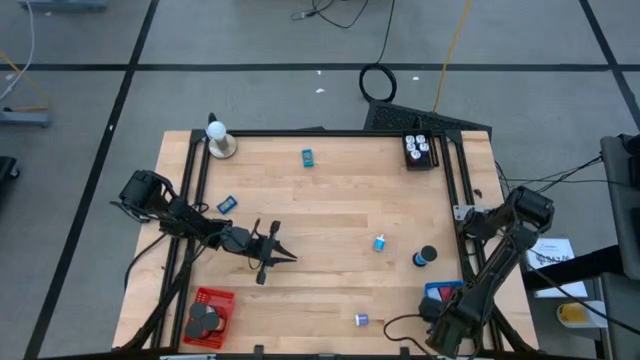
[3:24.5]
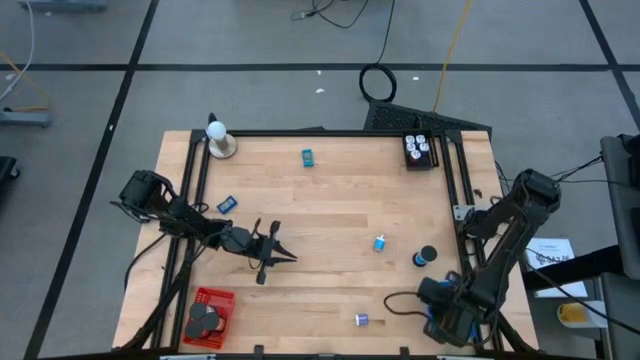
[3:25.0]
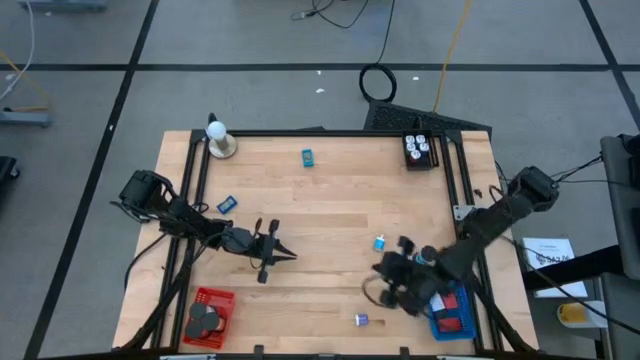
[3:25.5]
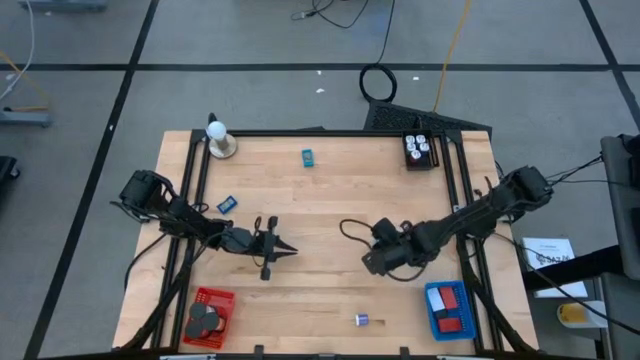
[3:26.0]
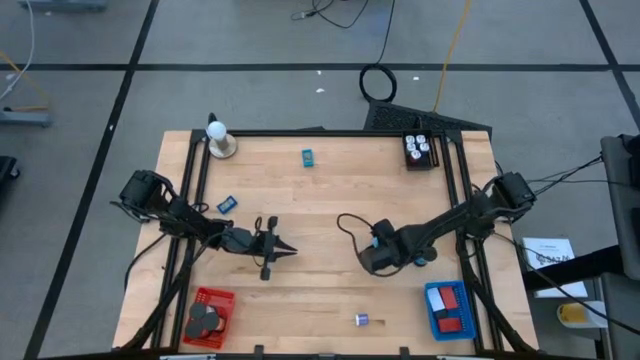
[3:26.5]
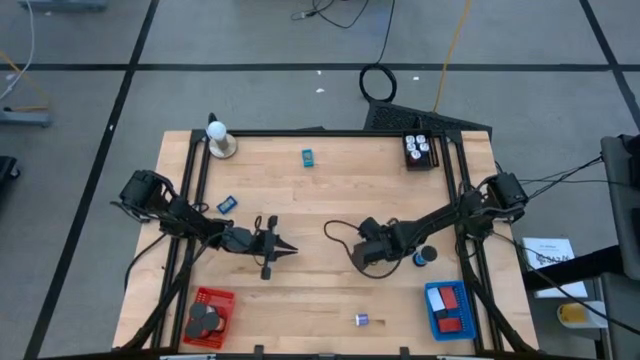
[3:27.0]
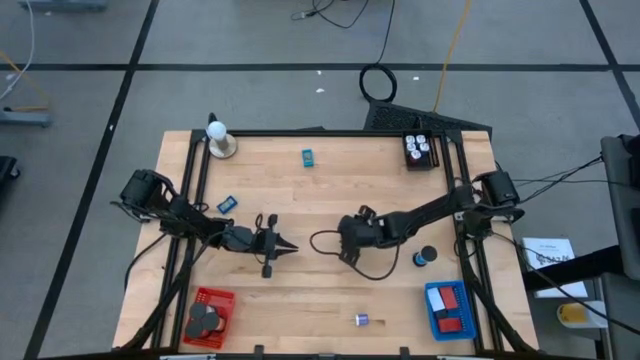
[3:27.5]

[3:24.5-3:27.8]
Task: Pick & Place Office items
Put the blue charger adapter into the black bin

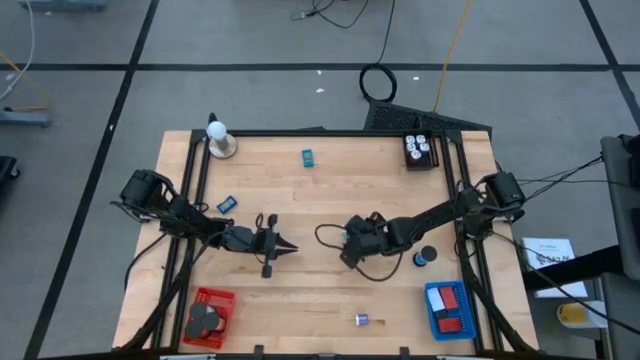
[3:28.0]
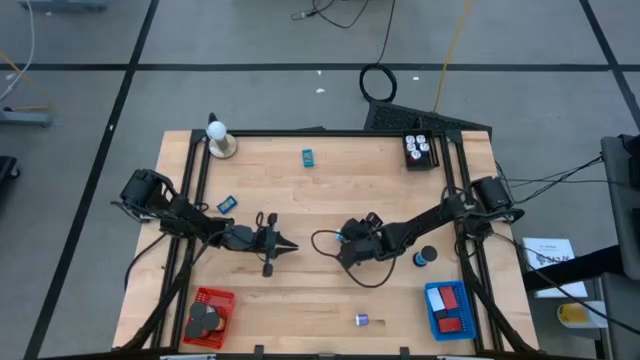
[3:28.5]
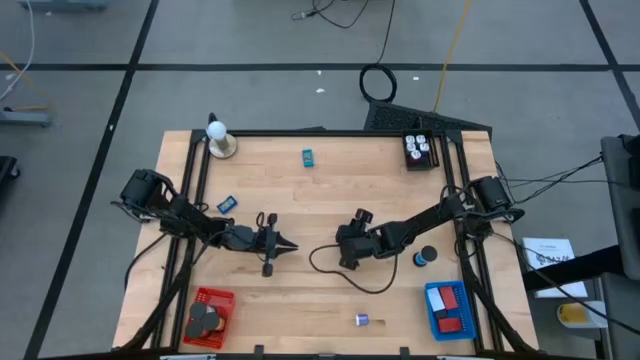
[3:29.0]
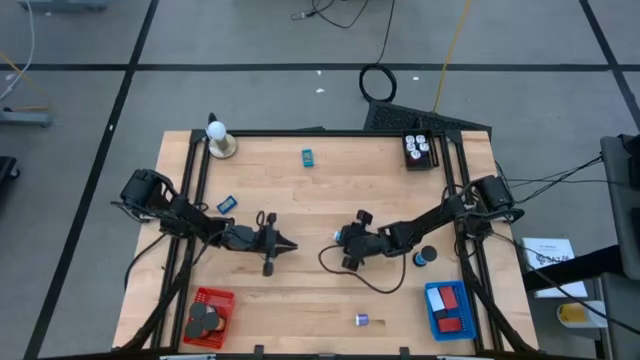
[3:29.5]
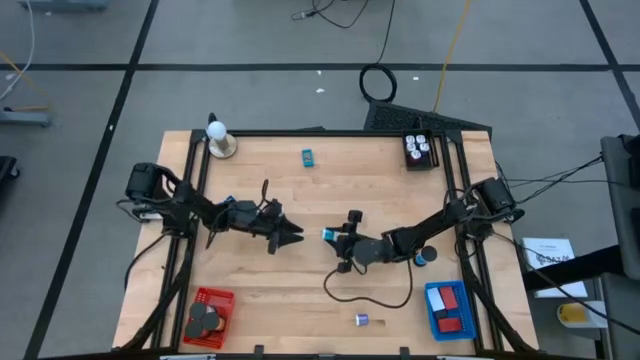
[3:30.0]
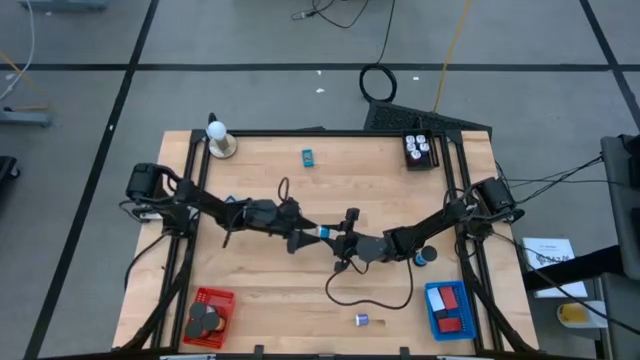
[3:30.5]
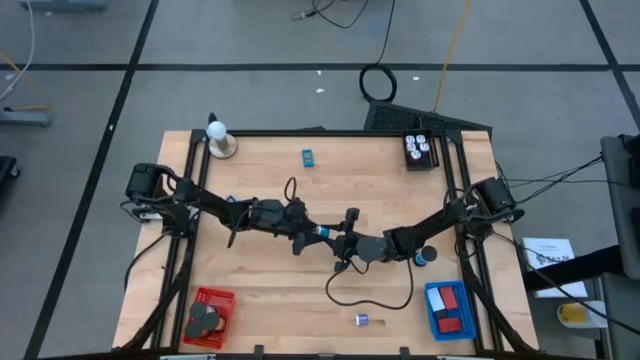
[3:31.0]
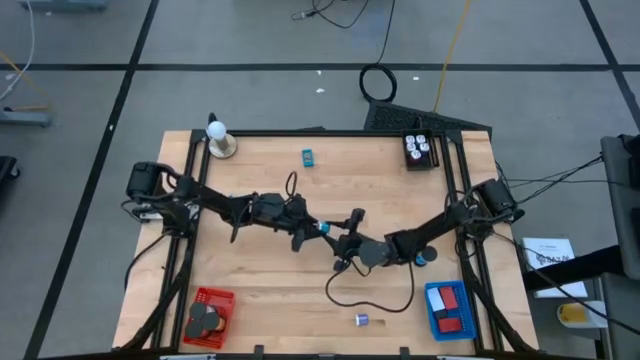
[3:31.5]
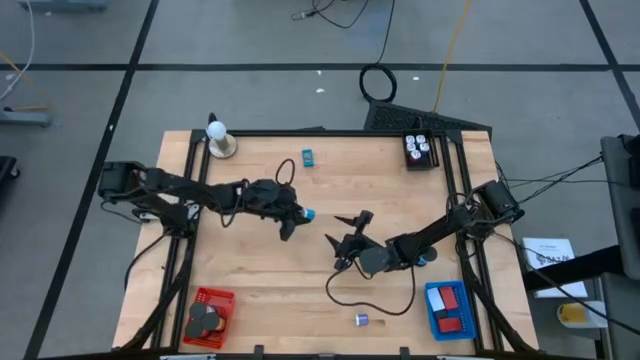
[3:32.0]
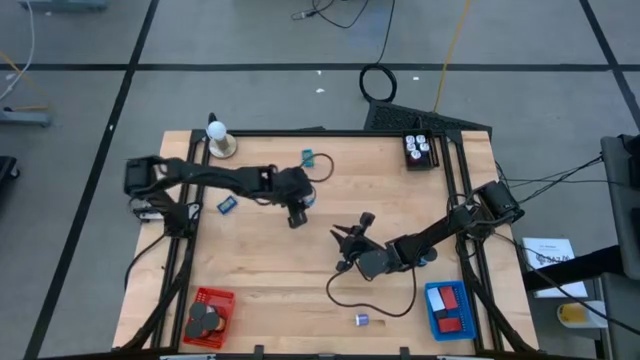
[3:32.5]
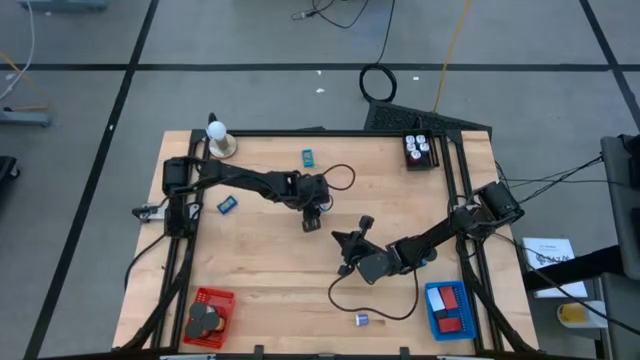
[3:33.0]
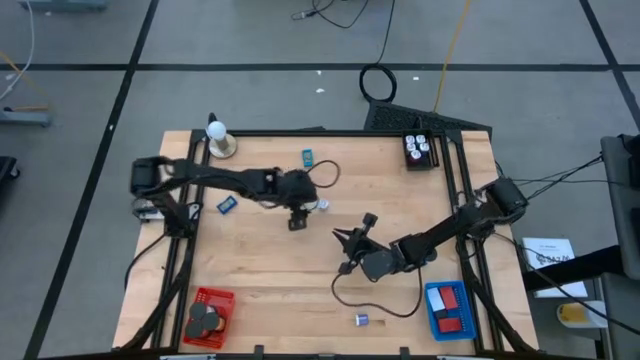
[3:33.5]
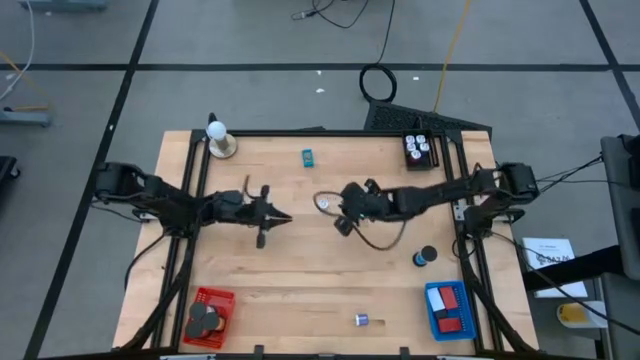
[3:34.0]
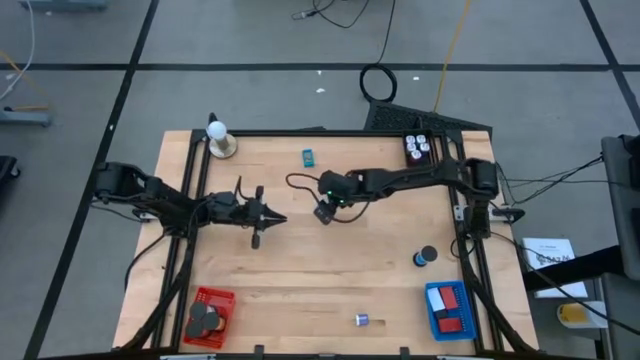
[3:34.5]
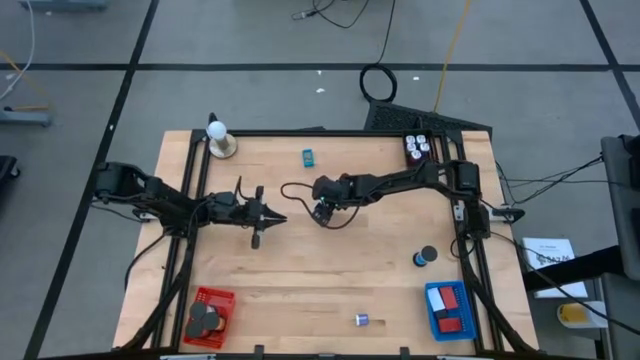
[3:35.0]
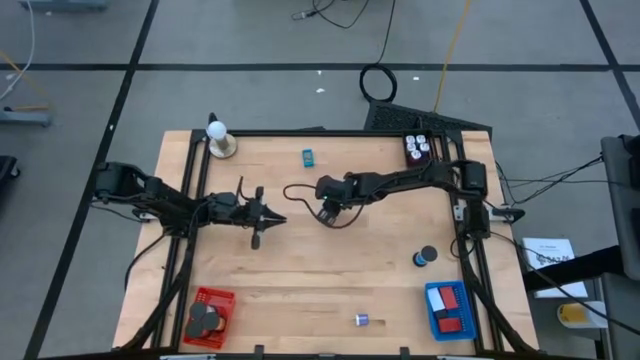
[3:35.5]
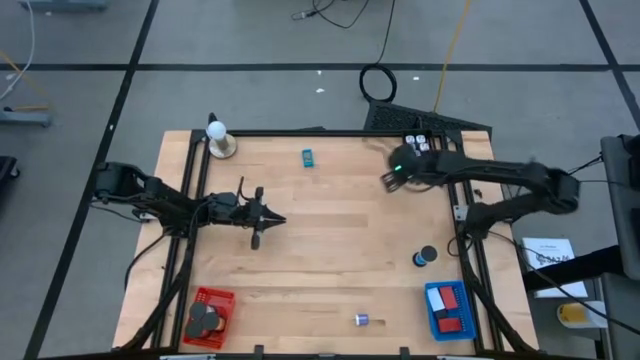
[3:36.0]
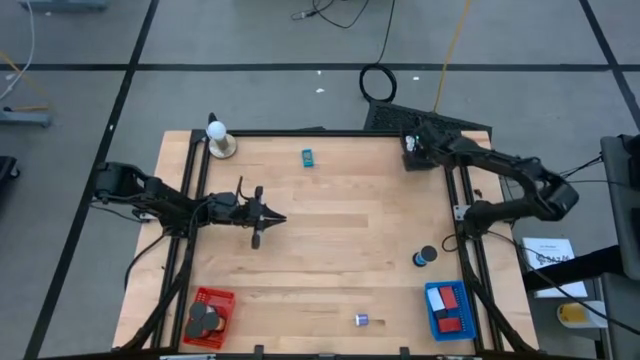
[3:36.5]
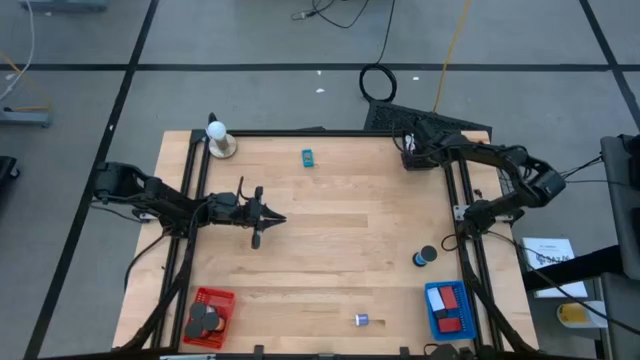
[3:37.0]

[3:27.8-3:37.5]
Put the blue charger adapter into the black bin

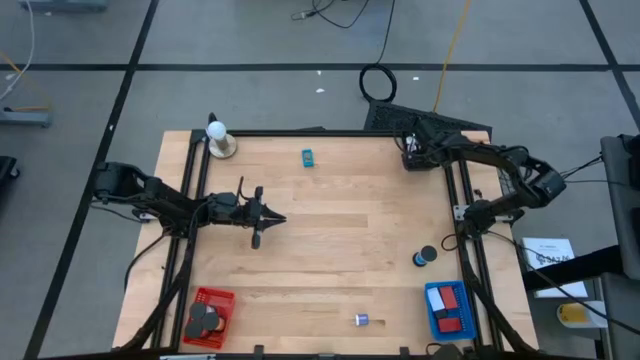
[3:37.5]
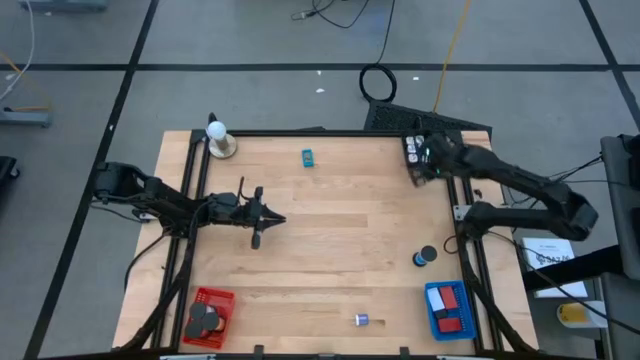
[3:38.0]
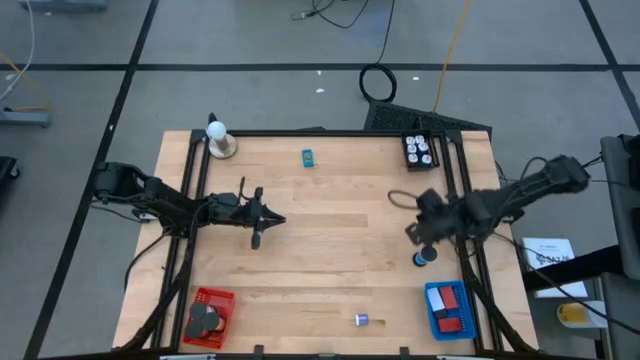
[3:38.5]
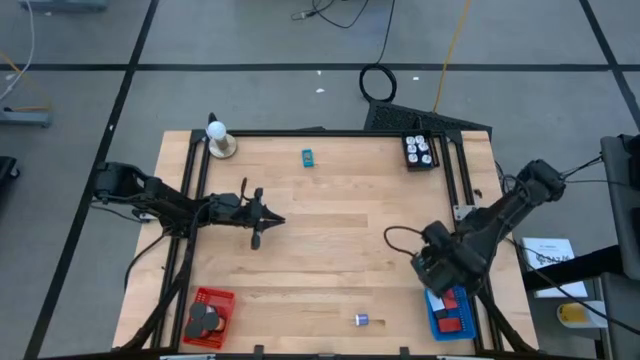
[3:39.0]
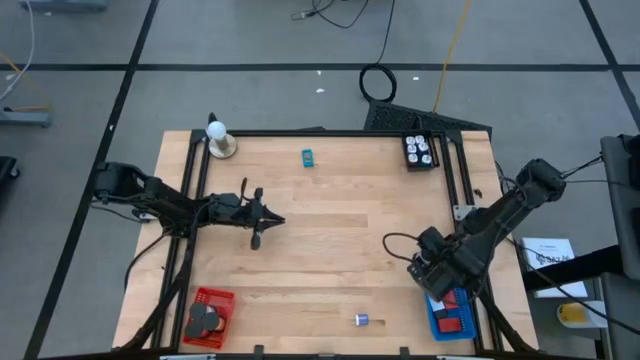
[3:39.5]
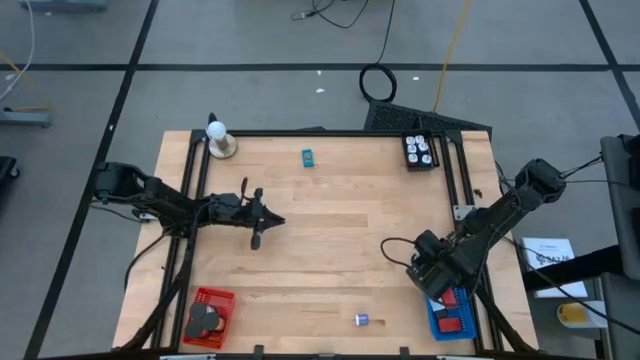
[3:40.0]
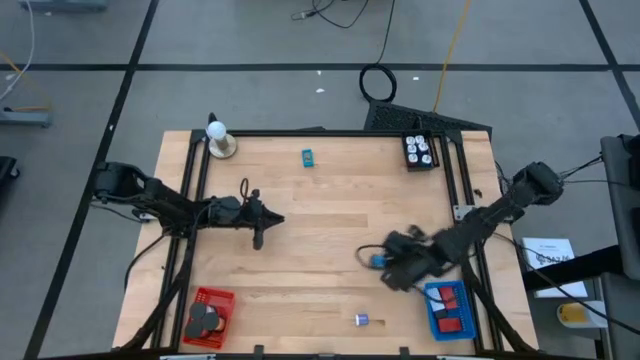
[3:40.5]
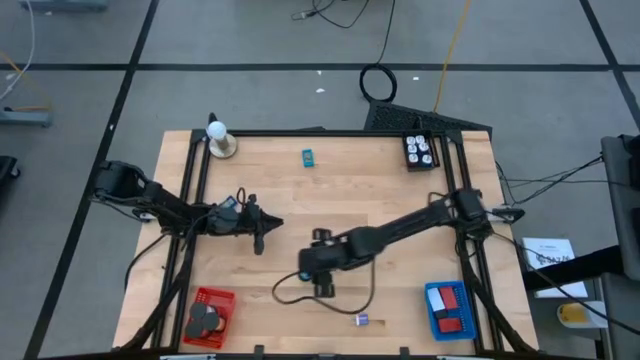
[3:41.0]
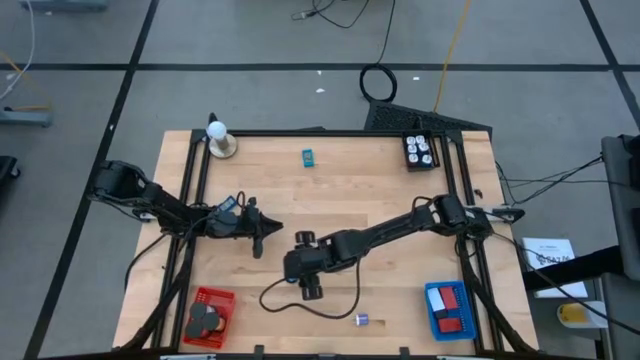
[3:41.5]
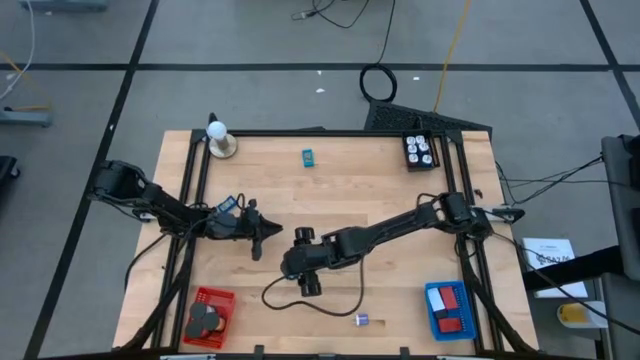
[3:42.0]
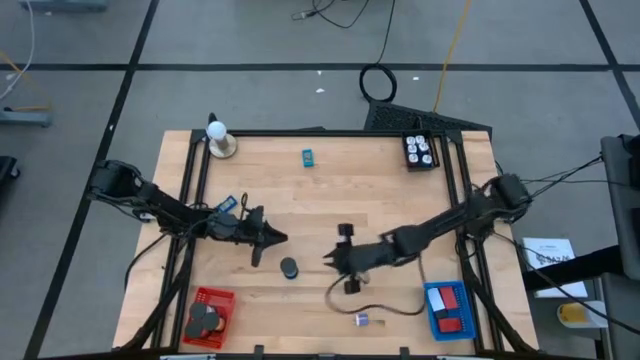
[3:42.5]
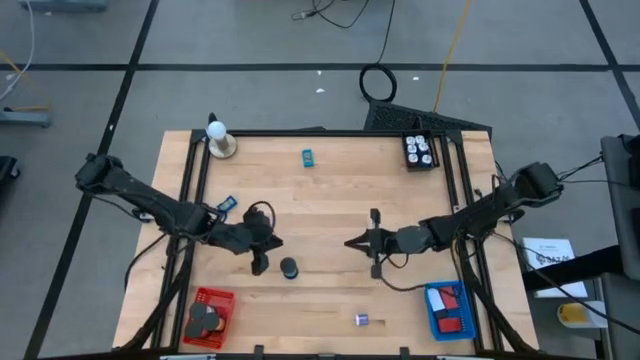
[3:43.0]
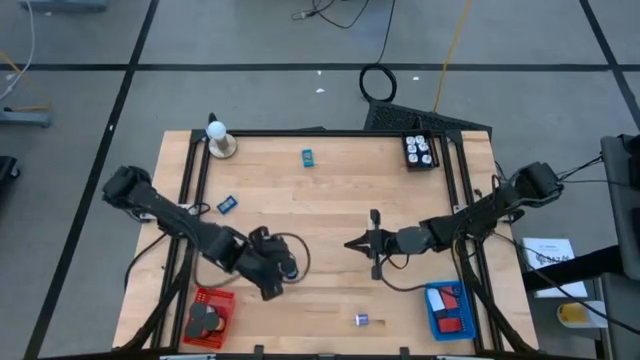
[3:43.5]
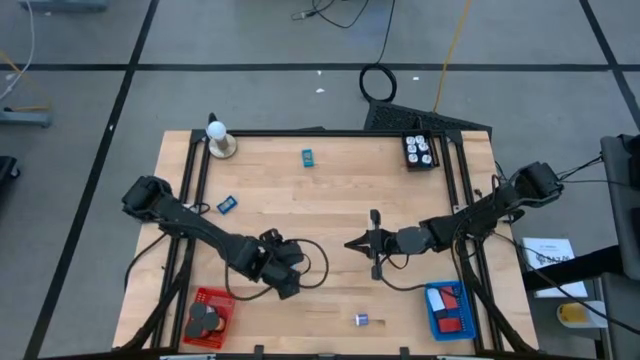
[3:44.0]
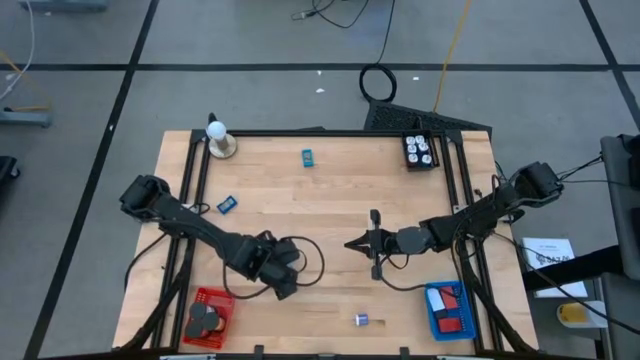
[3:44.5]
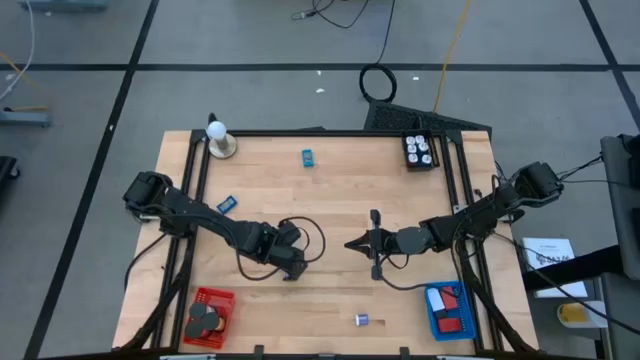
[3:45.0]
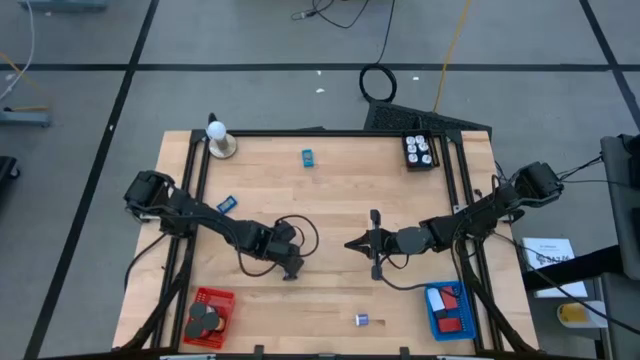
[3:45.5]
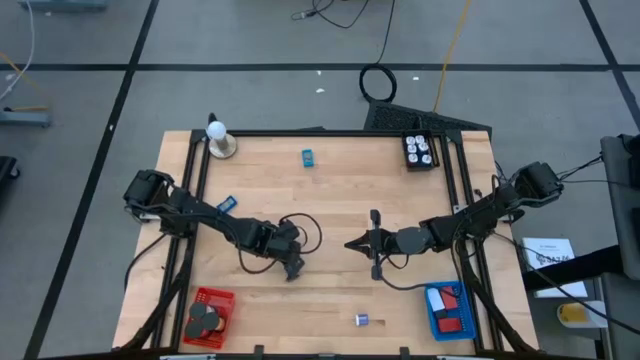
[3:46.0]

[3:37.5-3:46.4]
Put the blue hourglass into the red bin
